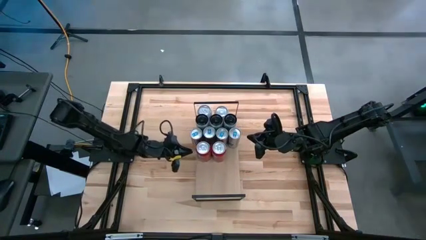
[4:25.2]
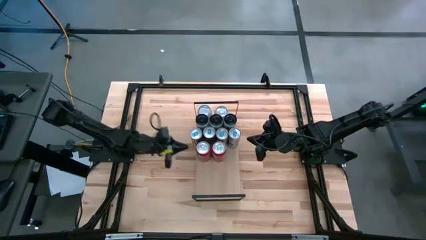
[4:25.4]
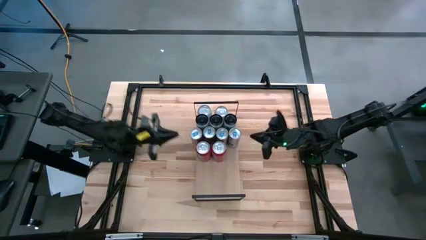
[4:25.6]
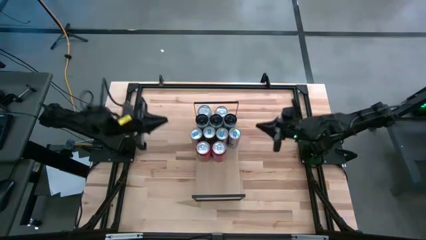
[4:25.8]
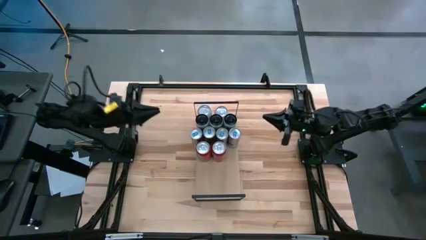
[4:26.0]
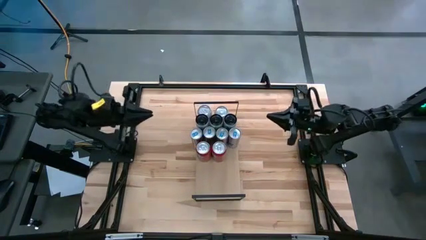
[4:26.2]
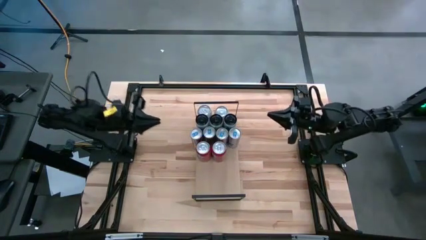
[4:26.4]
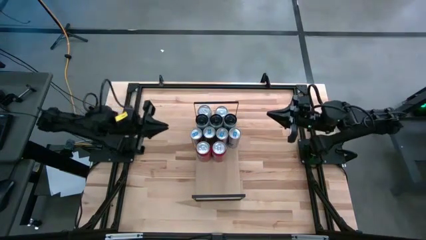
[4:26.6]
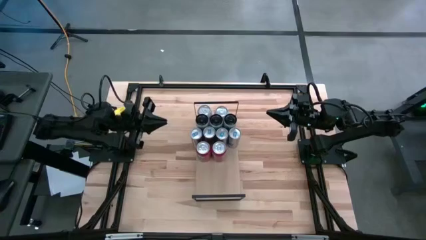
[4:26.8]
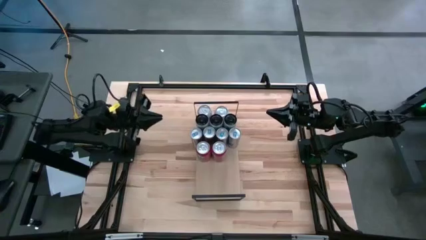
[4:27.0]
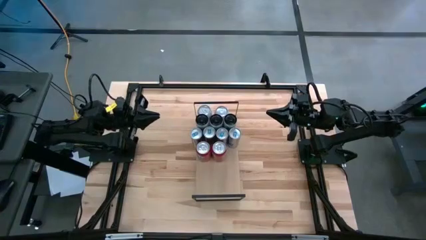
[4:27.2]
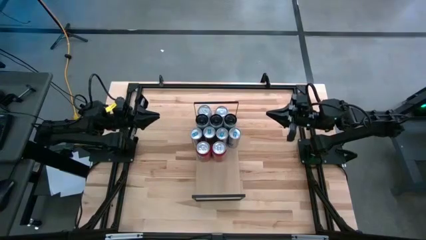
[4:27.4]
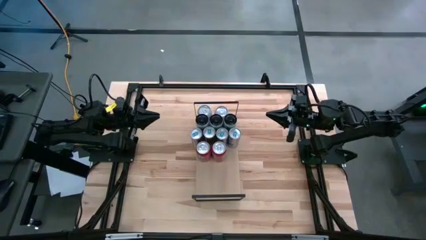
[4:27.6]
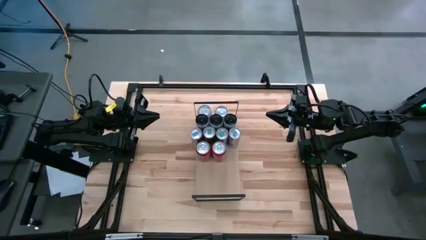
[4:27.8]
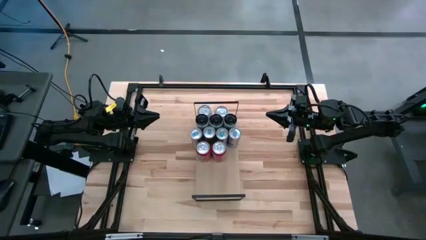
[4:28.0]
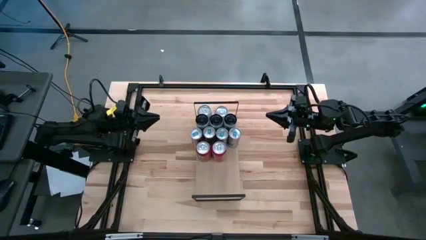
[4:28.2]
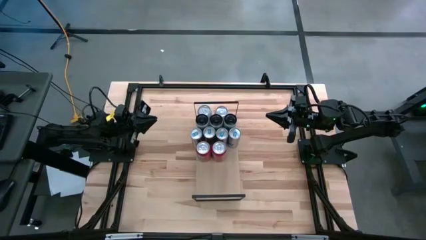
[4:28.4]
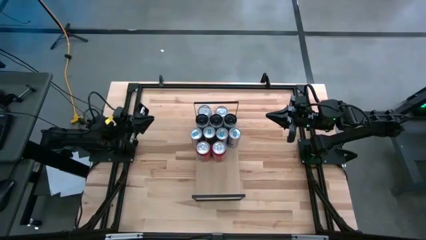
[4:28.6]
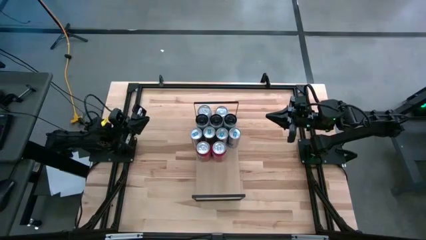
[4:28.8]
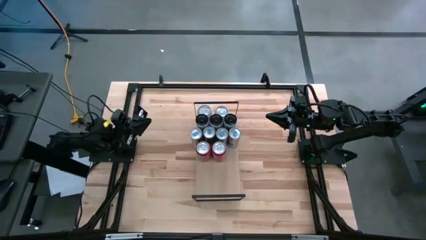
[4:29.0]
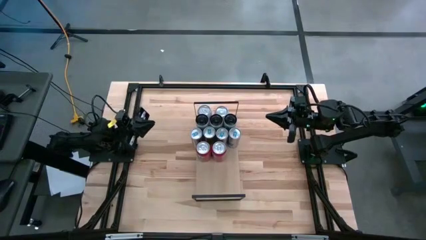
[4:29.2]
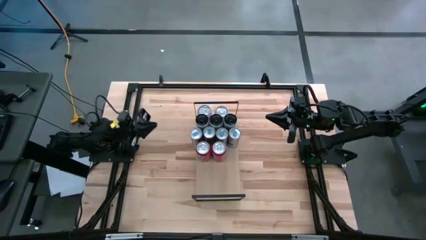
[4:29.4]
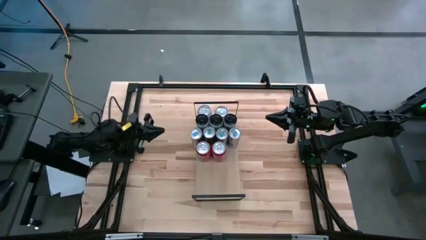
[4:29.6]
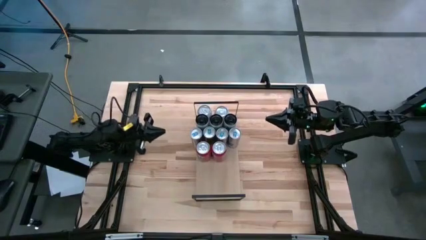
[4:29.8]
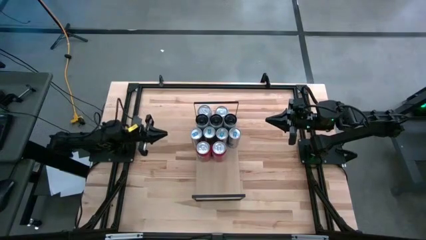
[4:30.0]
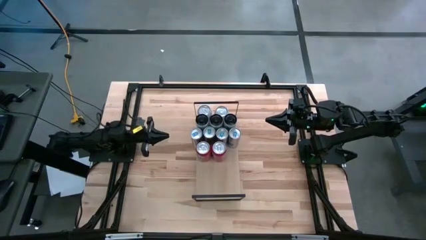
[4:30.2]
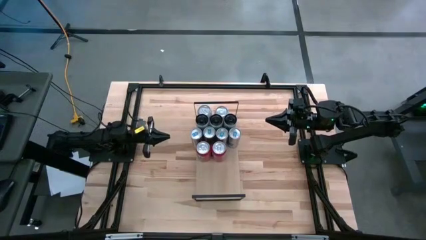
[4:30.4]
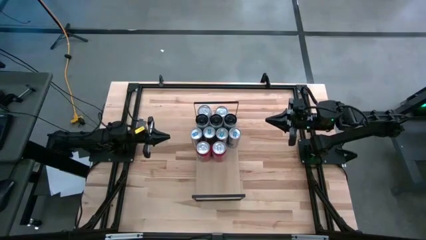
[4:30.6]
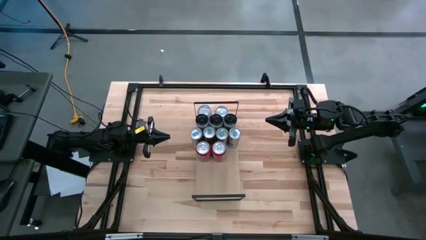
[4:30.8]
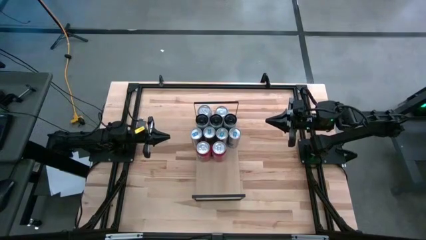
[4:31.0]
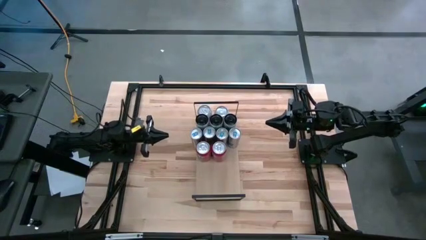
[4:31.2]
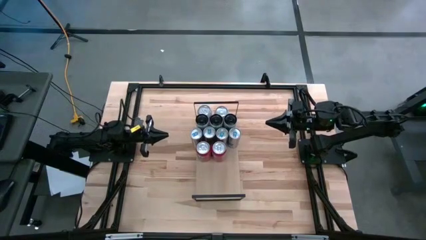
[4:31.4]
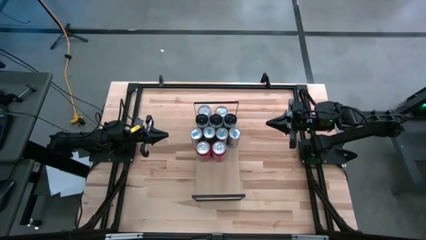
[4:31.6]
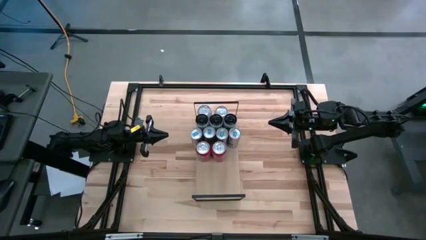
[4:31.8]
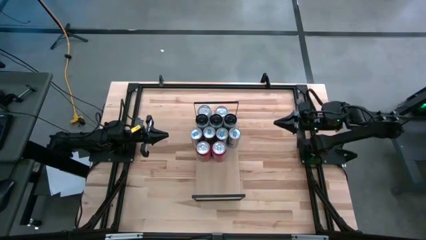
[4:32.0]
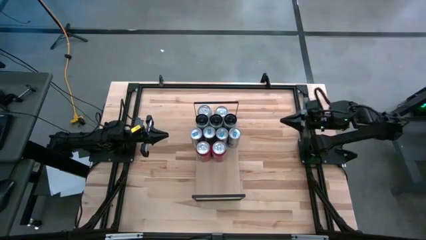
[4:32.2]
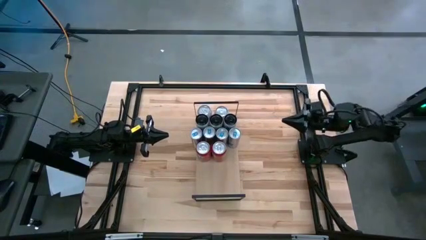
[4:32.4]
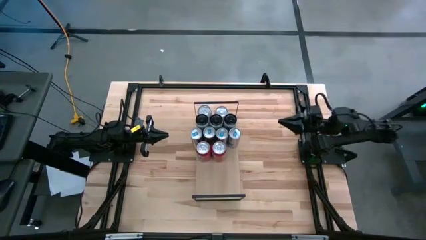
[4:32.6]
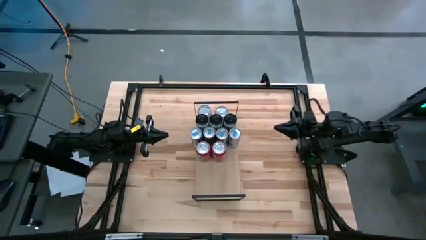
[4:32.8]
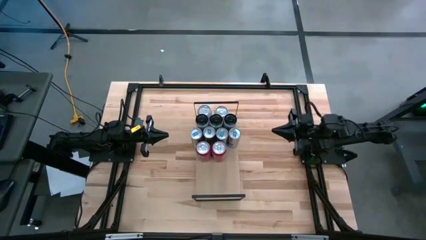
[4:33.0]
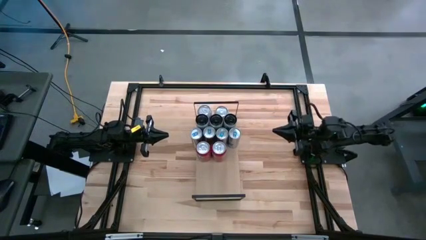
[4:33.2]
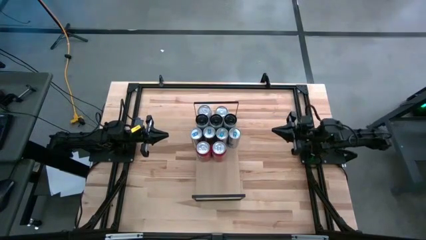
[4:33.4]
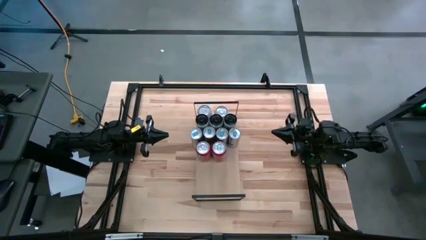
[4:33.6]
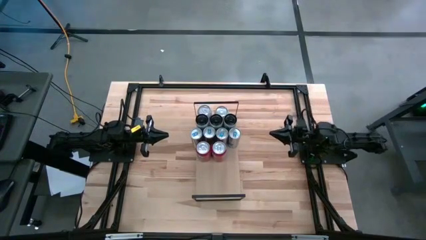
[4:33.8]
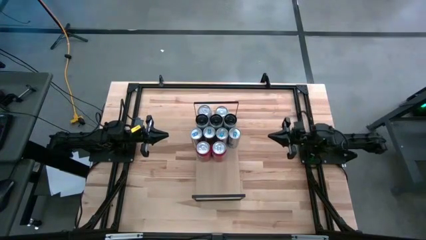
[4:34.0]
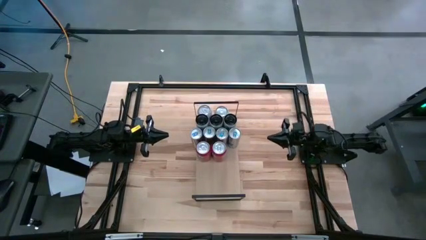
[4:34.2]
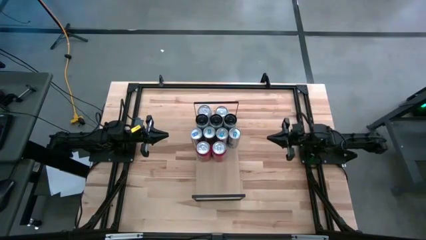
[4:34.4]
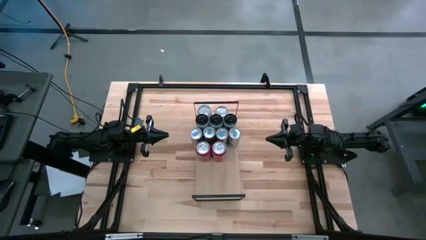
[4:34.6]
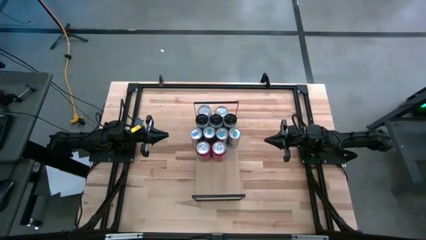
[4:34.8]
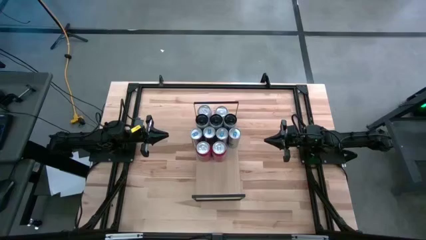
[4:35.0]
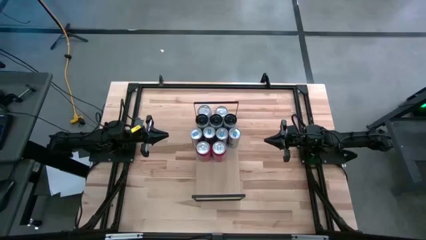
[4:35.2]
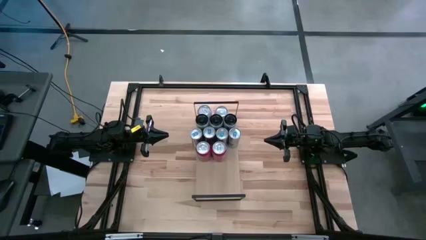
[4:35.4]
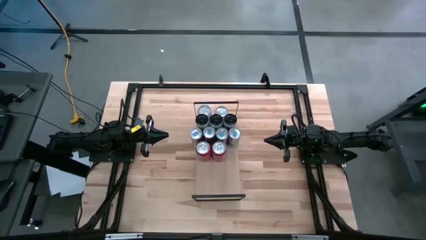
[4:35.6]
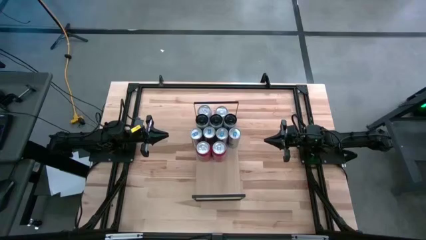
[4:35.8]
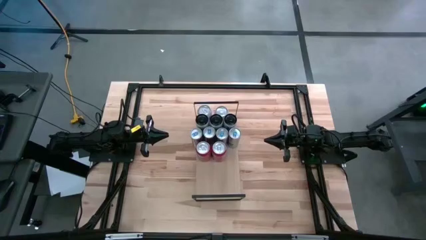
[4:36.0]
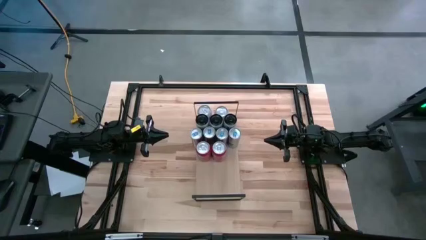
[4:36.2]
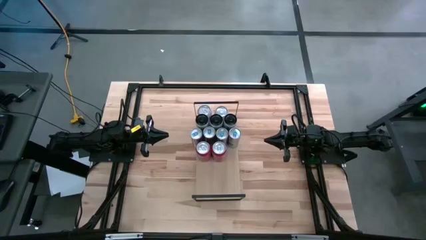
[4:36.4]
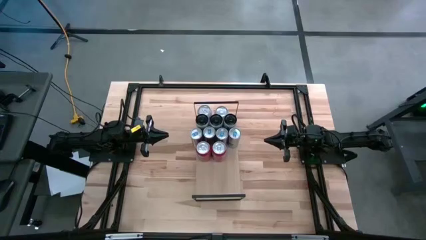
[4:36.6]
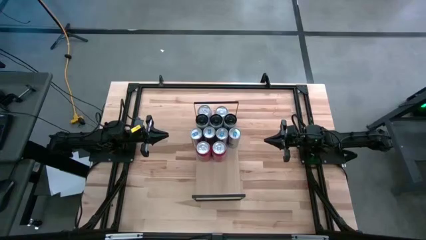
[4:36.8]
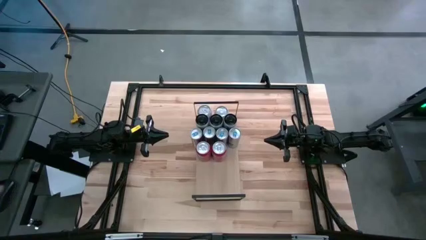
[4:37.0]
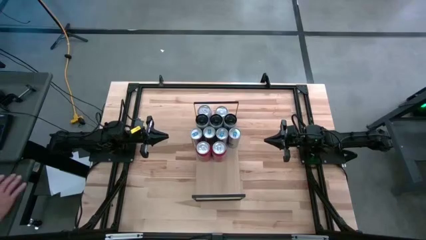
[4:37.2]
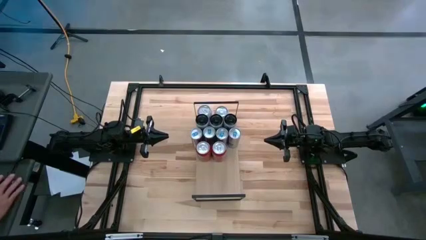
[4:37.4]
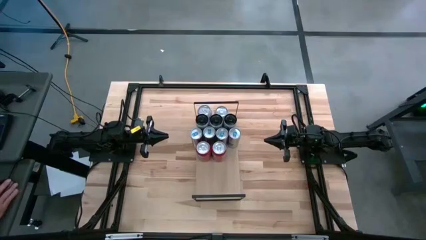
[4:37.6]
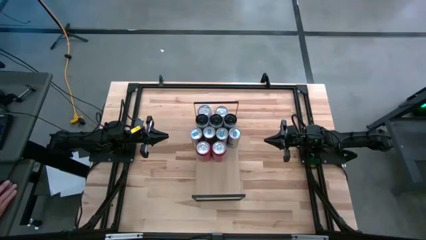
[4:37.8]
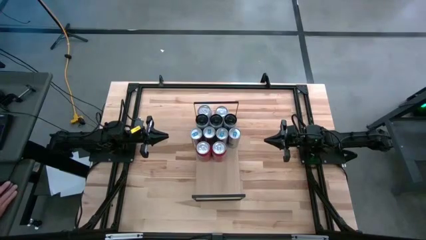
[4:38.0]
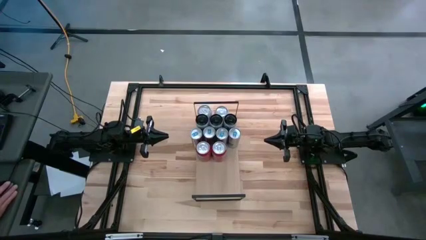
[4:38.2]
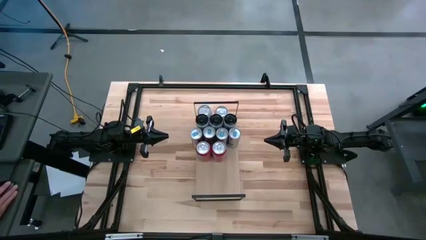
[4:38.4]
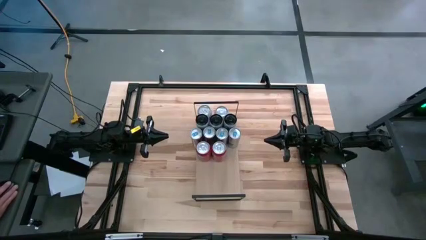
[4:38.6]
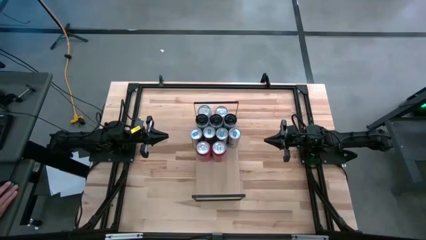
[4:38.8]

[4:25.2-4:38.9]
Task: Place canned beverage on shelf
Return to Home Position
